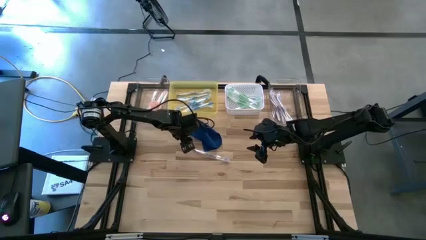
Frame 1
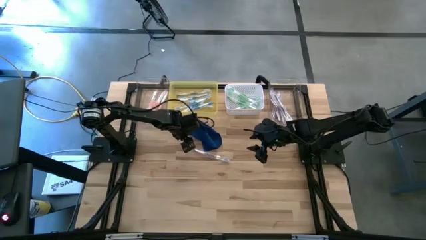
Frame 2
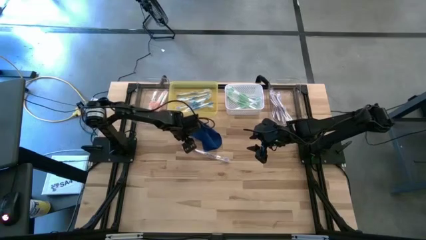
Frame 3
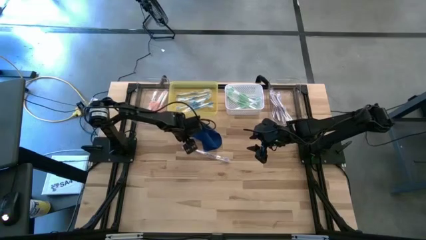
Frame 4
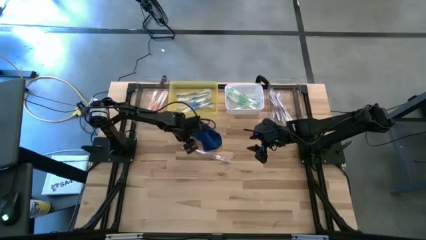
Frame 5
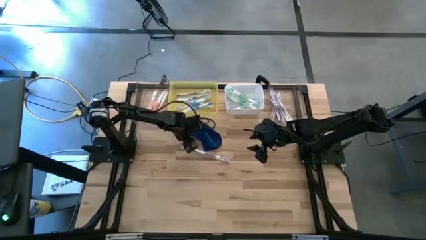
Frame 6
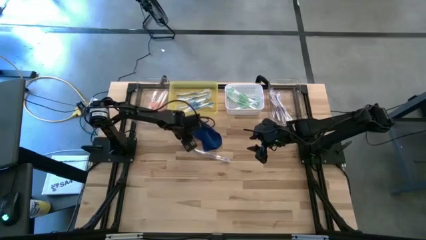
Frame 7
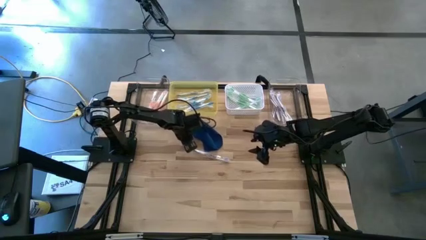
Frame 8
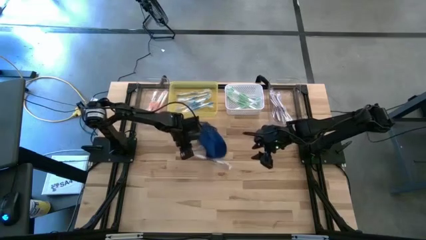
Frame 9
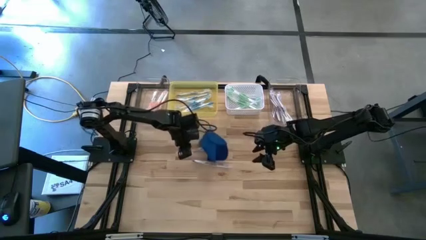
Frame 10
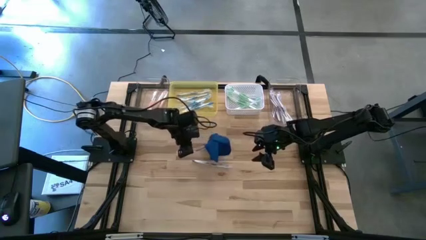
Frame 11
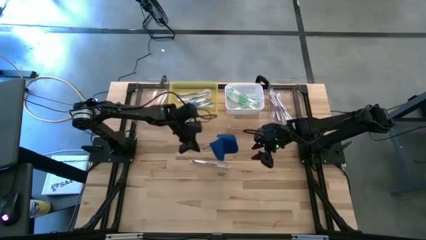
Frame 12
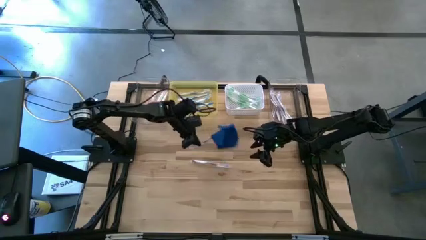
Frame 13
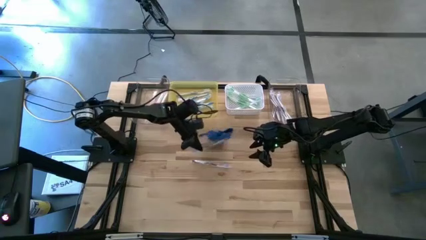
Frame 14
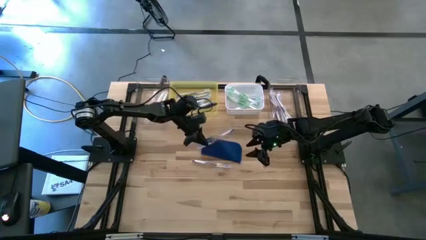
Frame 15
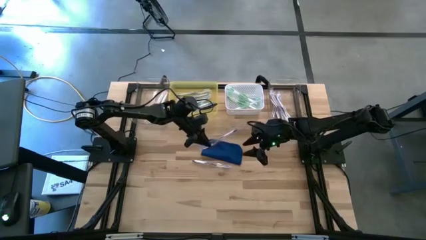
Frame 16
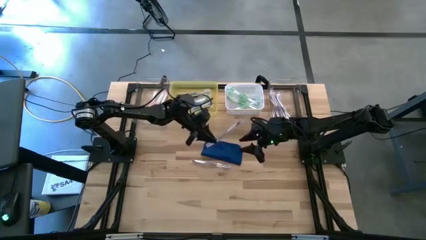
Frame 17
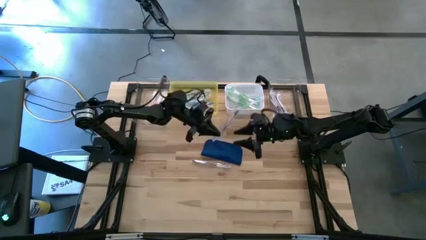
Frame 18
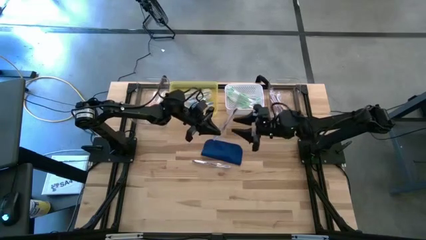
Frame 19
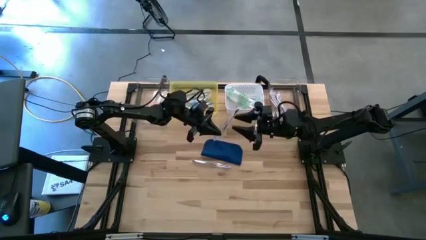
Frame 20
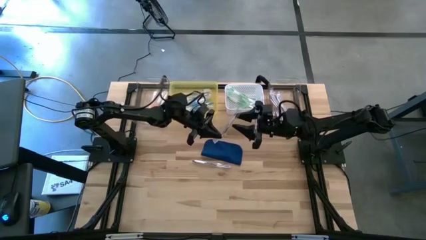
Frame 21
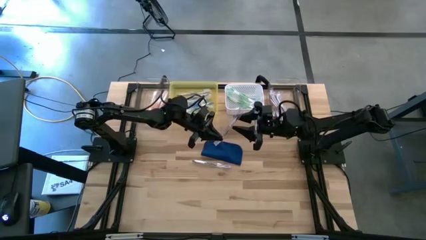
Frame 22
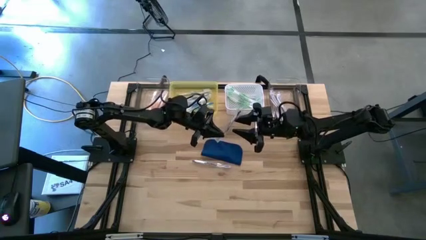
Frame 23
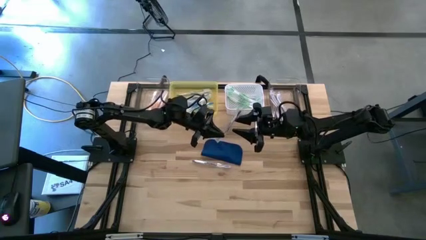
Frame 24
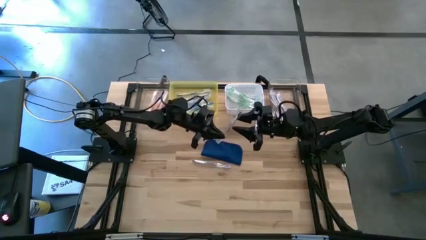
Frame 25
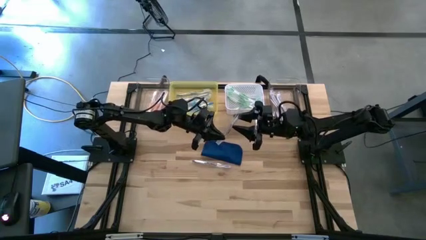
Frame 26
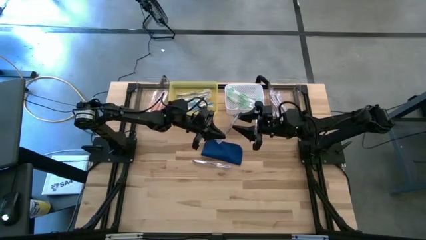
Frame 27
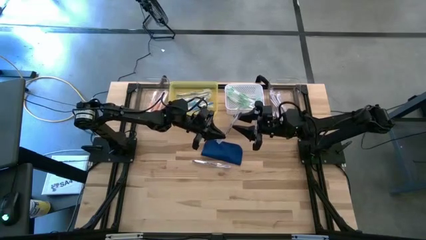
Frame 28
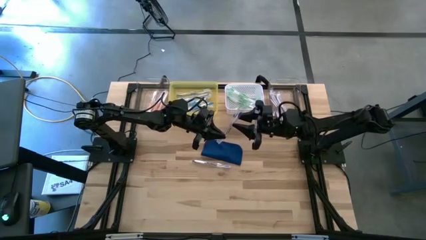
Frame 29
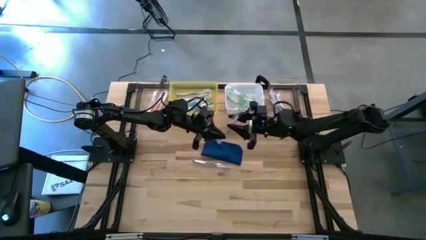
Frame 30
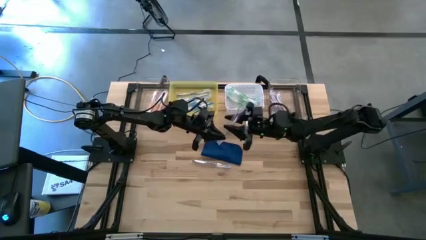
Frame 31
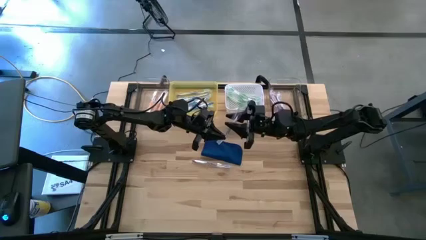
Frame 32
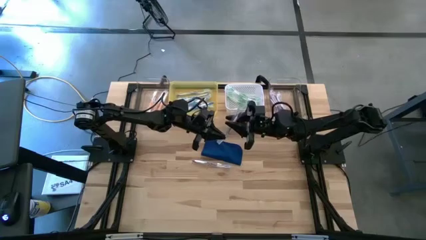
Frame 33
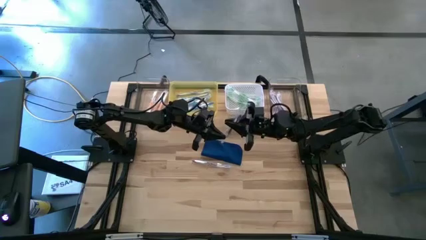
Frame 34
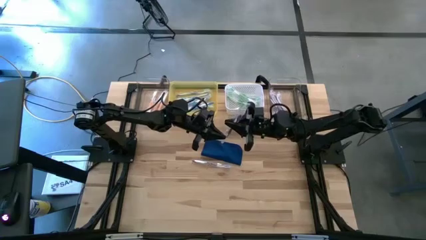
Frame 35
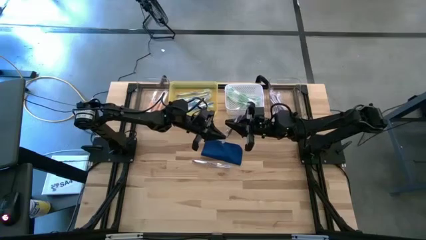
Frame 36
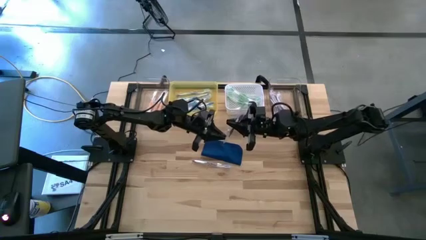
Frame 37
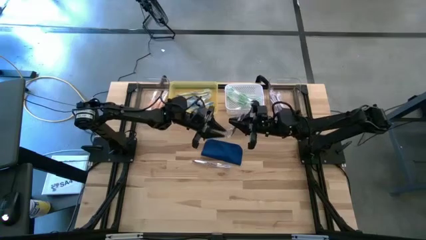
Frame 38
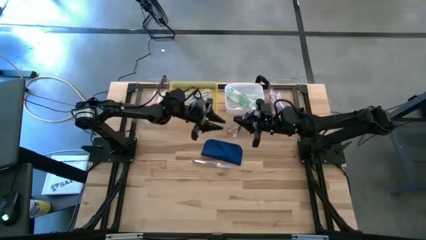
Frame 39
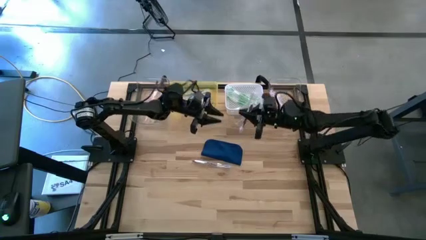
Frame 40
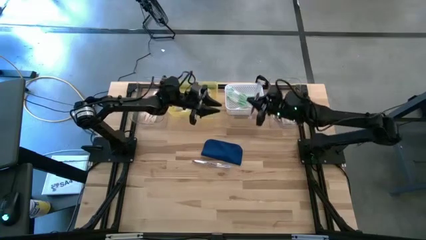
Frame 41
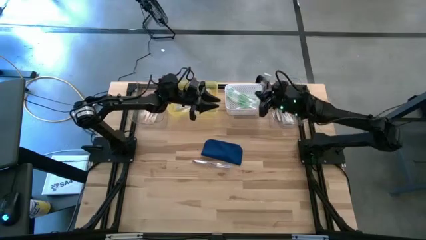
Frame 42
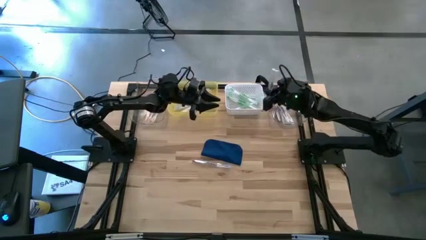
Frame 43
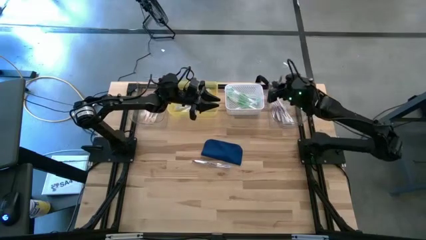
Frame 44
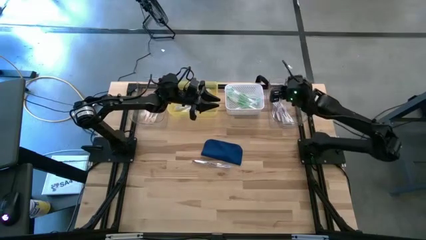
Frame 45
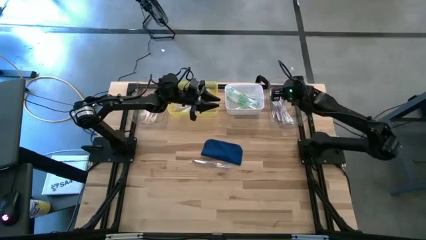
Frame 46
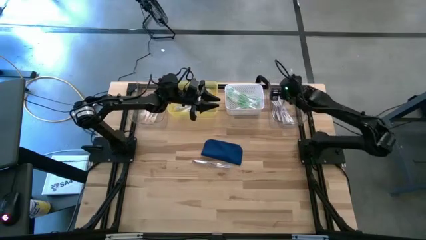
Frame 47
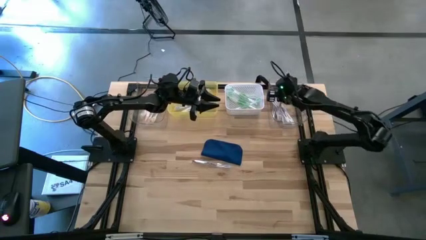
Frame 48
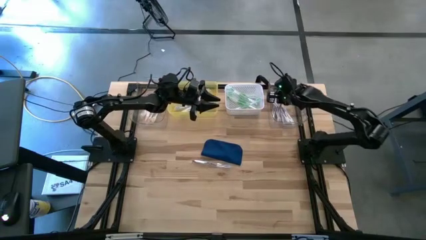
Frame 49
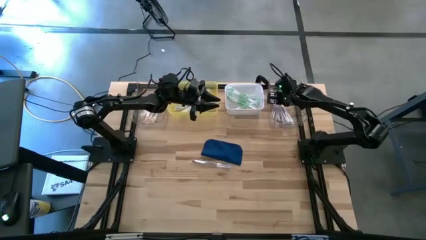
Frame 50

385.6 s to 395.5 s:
Task: Pick & Place Toothbrushes
Put the violet toothbrush into the right transparent bin

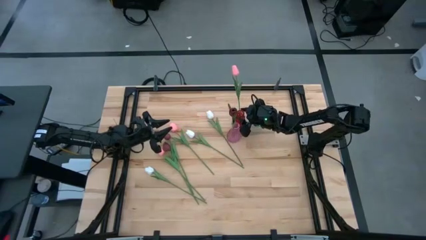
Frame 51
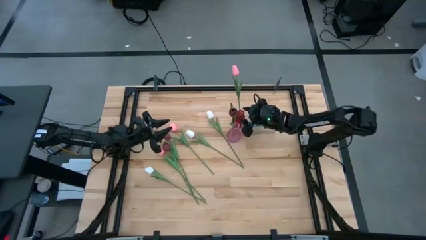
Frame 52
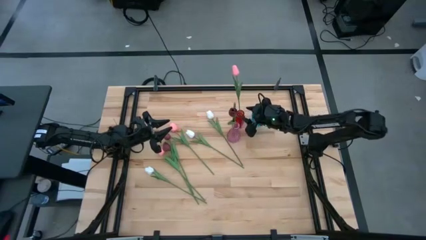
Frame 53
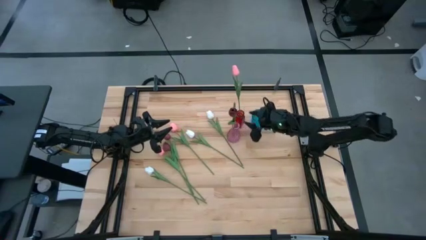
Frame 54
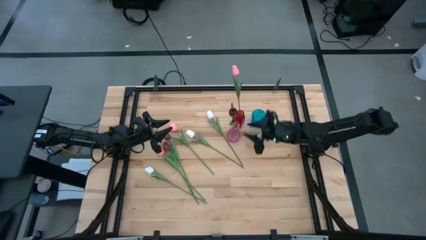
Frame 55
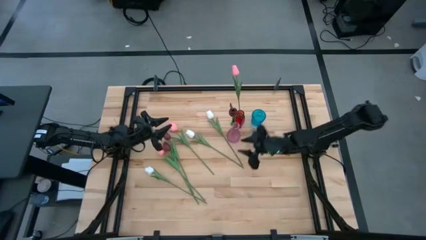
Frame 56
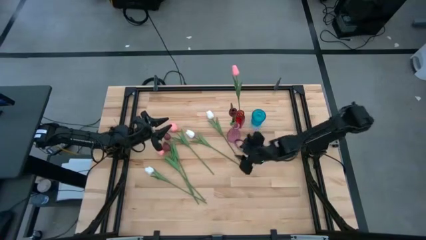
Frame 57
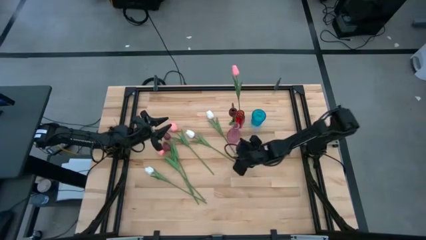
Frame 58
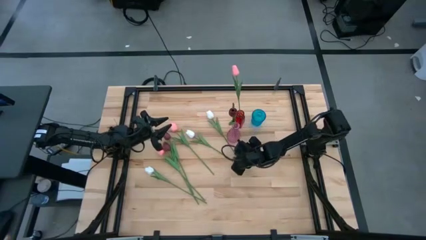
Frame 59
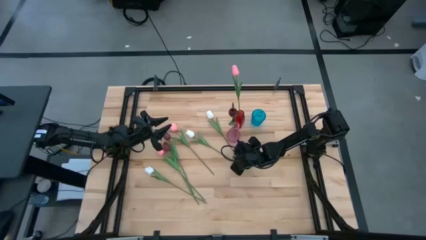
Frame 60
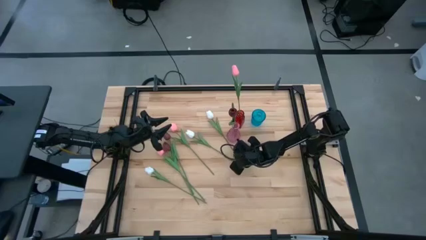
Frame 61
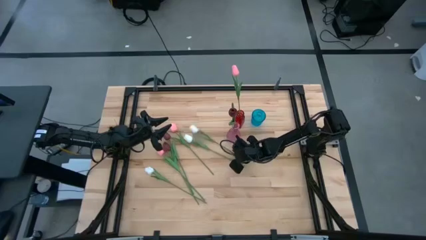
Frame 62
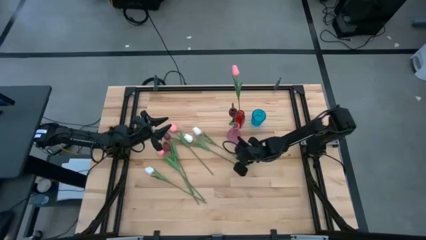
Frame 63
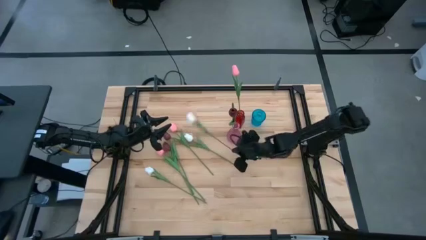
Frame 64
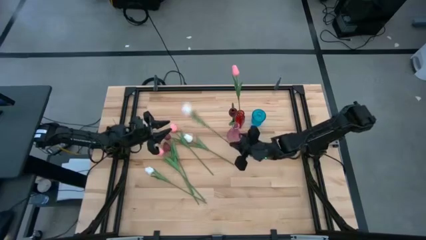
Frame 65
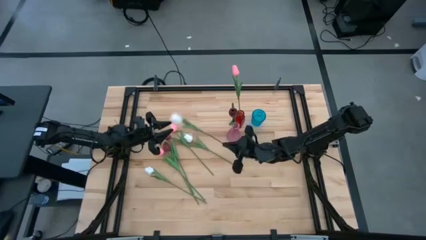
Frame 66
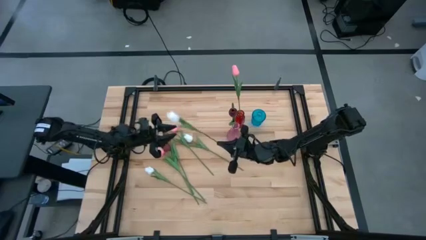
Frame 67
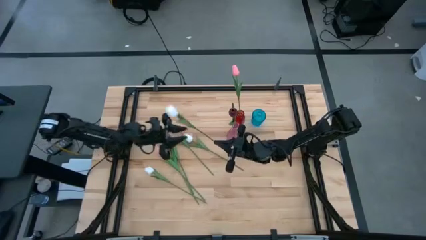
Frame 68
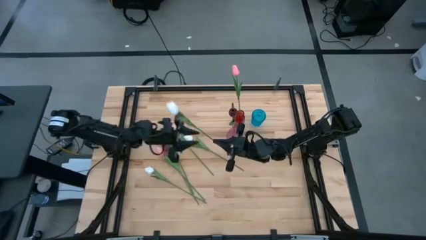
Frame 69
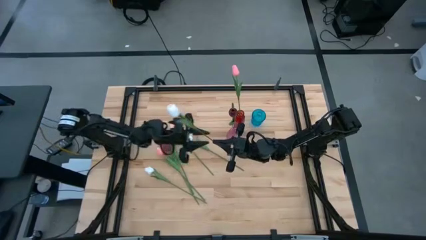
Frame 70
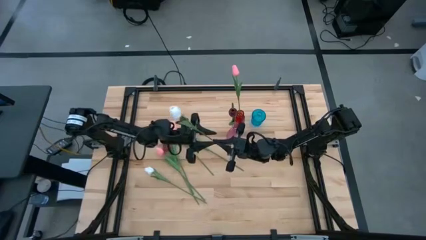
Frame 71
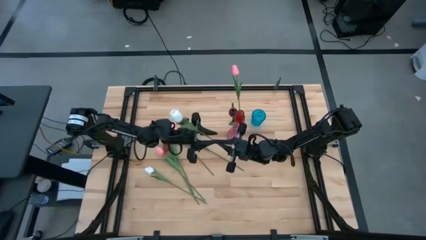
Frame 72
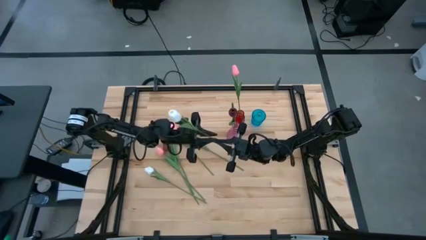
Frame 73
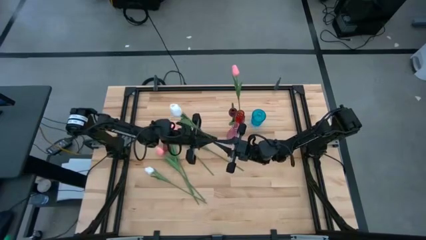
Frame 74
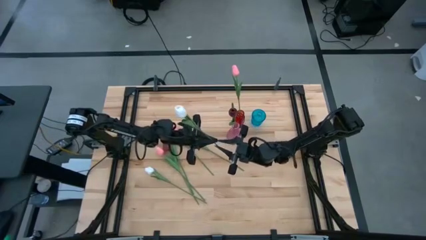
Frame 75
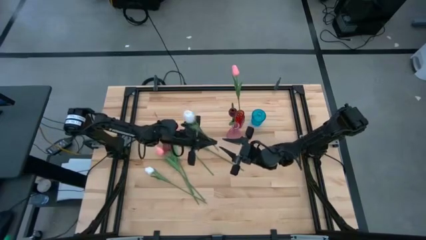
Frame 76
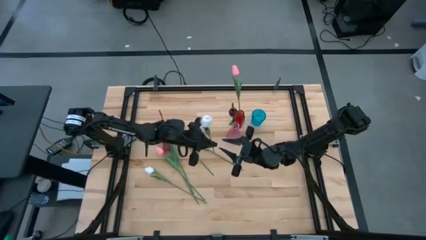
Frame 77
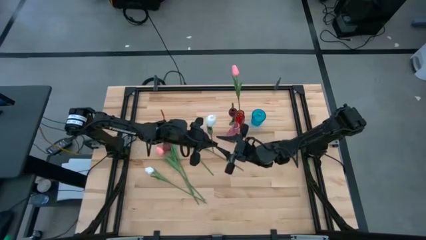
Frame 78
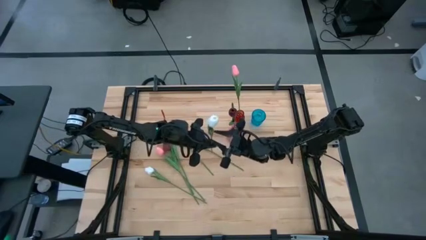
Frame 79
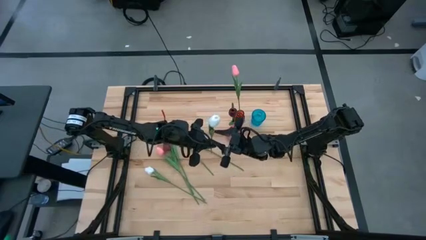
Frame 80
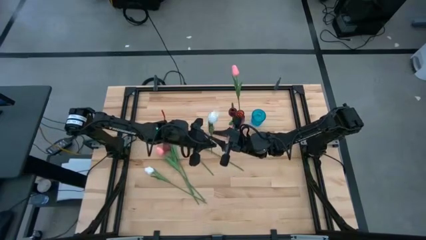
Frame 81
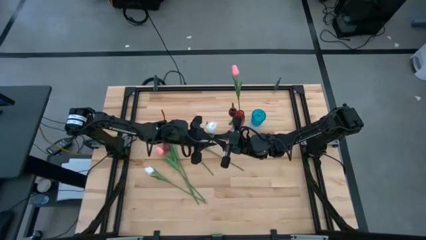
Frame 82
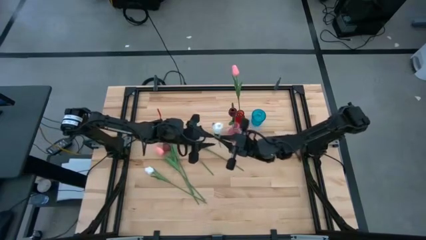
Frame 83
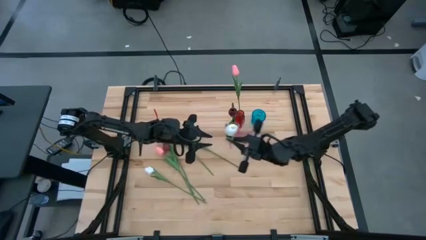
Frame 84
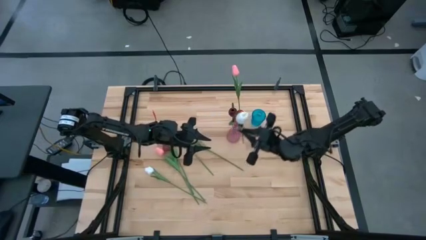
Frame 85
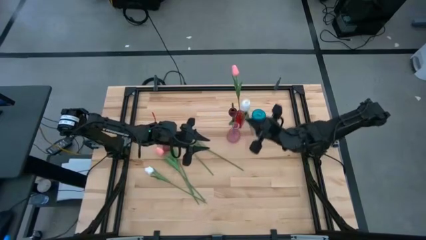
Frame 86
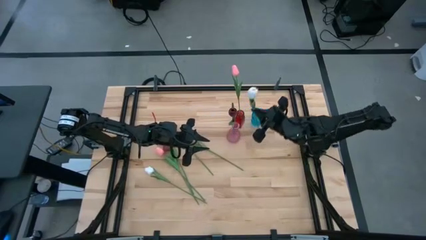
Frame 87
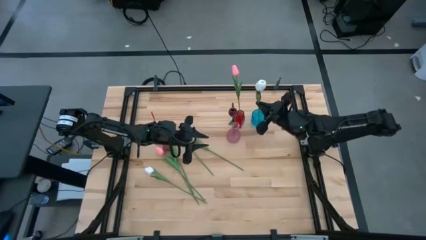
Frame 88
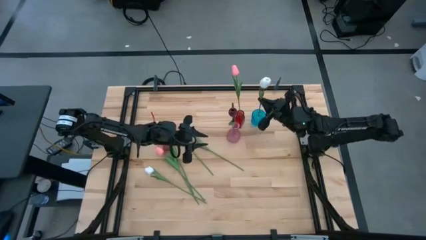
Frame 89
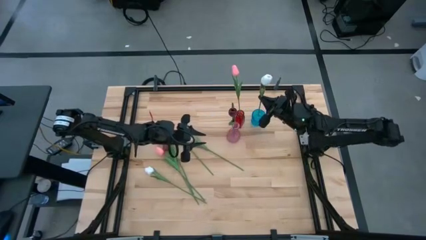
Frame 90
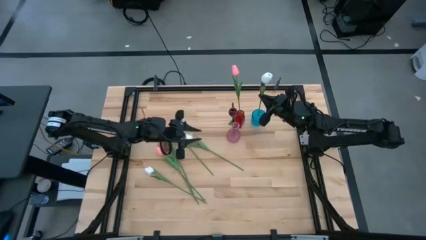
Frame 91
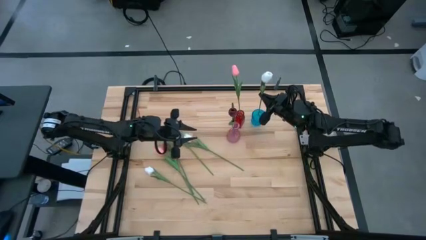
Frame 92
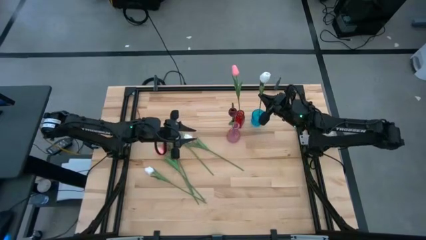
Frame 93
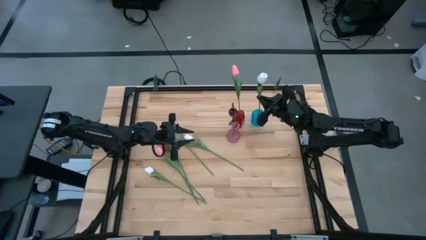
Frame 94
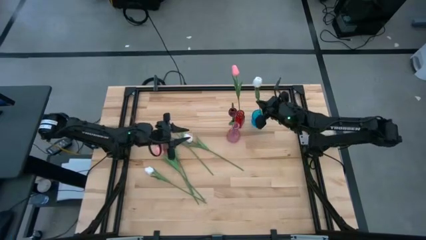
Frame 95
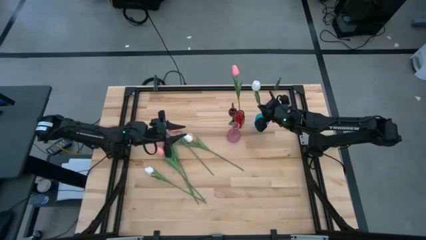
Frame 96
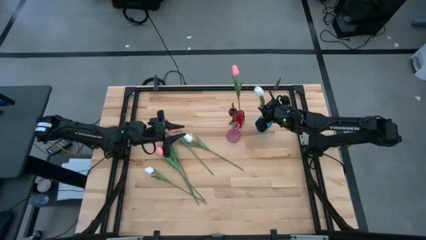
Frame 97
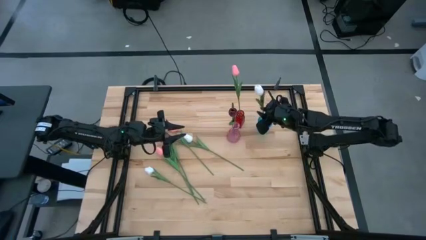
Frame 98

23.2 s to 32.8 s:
Task: Sort flowers into vase by color
Put the top white flower into the blue vase
